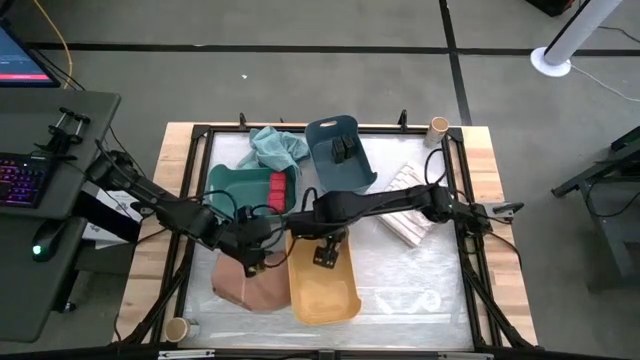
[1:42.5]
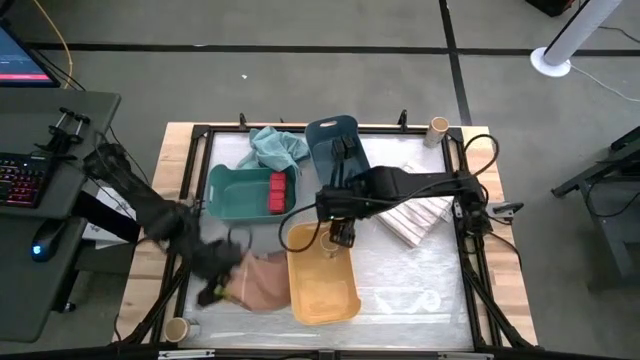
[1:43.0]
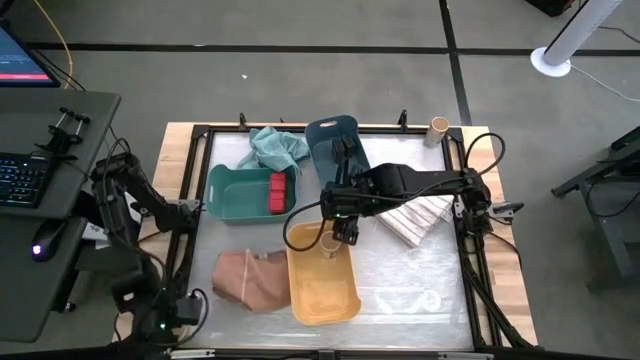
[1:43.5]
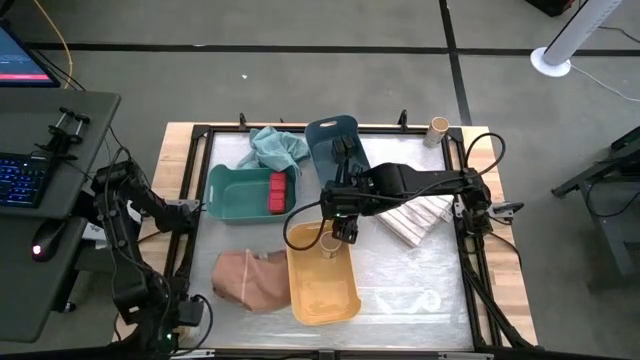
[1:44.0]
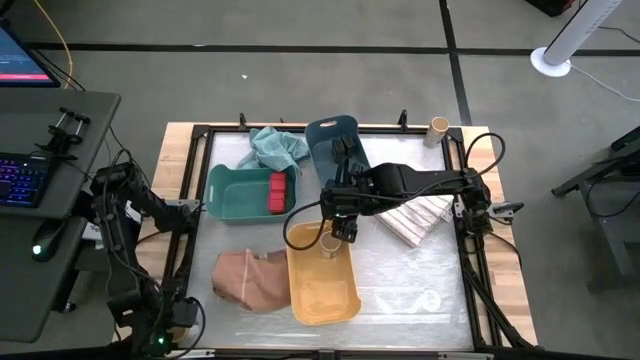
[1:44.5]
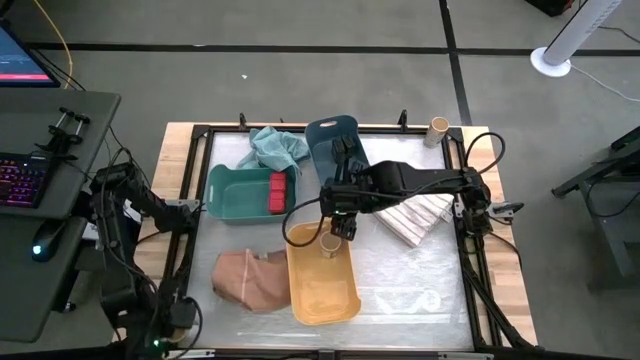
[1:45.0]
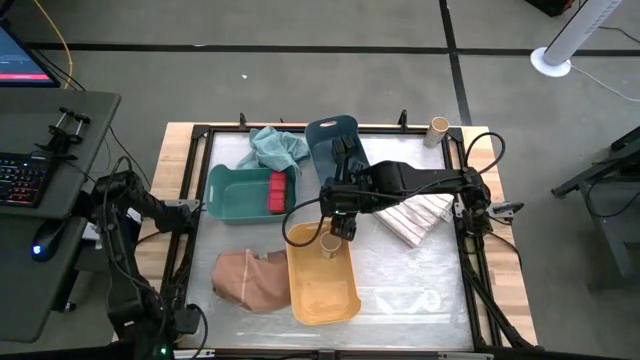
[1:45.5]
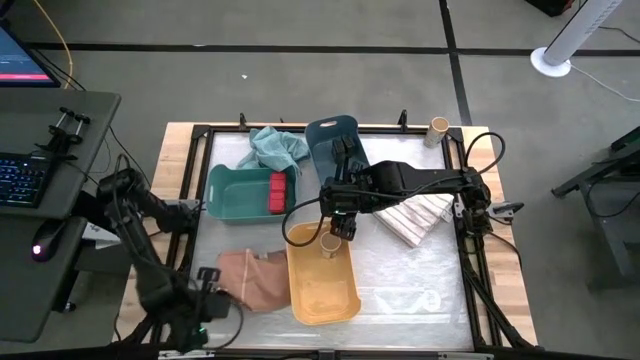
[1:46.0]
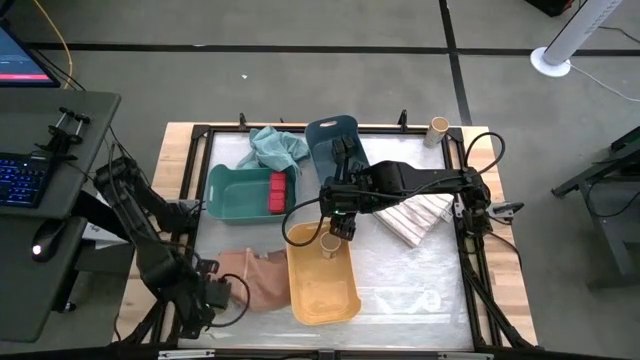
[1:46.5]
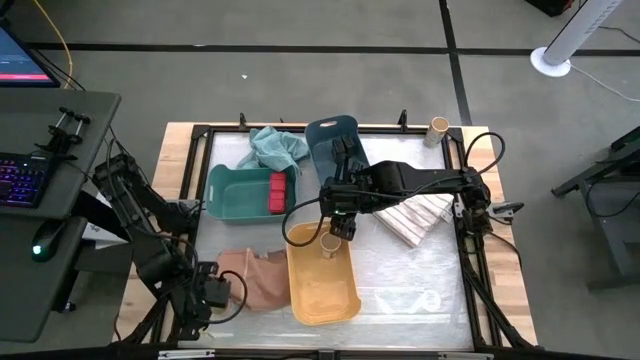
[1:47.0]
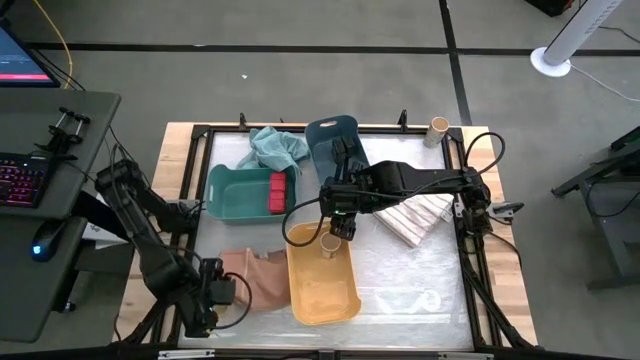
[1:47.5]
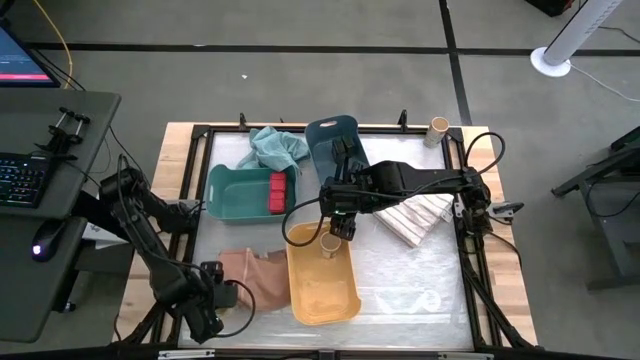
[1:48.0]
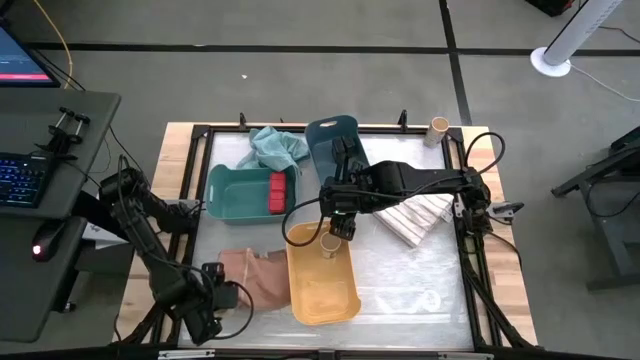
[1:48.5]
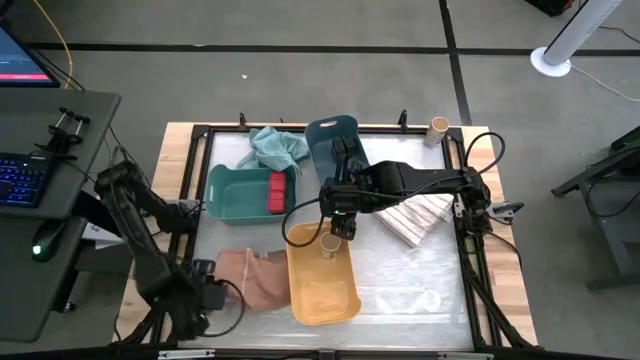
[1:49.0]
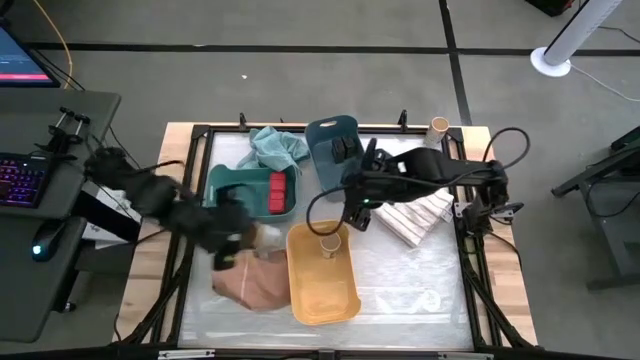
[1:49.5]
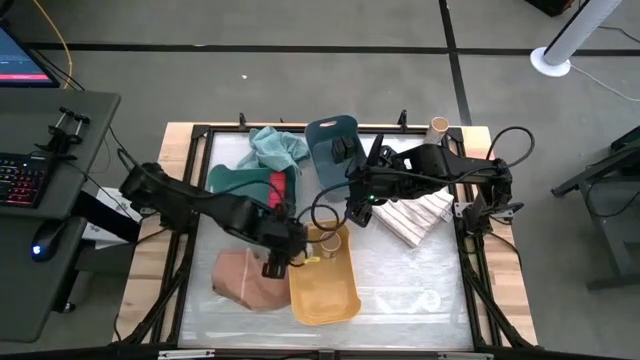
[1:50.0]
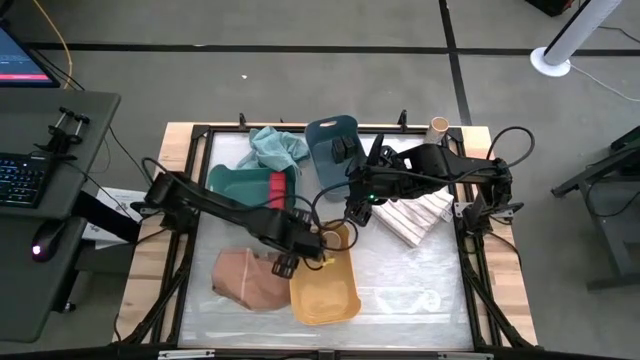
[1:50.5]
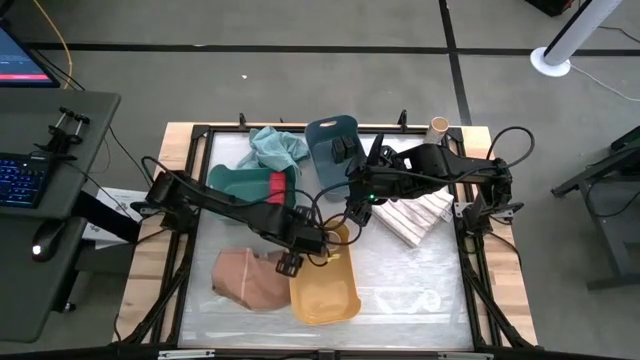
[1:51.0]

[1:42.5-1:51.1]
Task: Sort spices by type
Put the bottom gold seasoning bottle into the orange bin

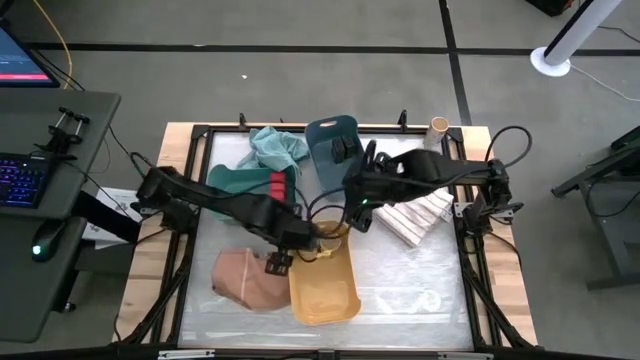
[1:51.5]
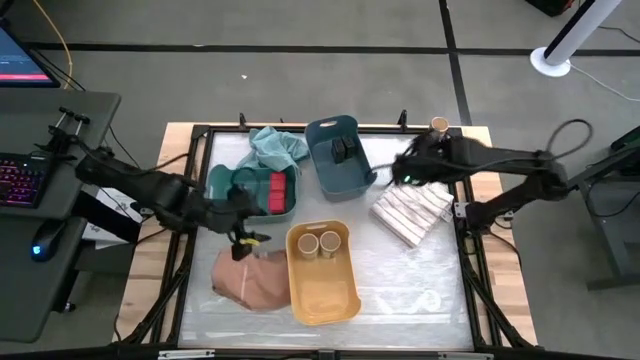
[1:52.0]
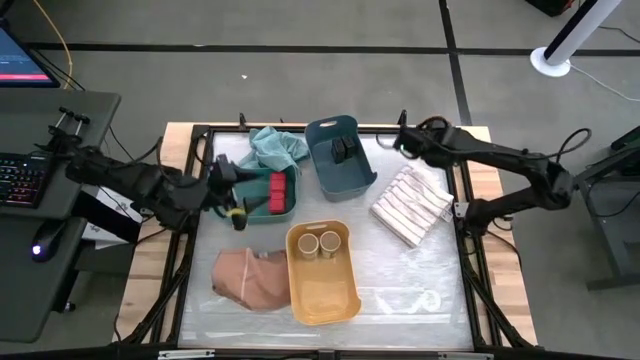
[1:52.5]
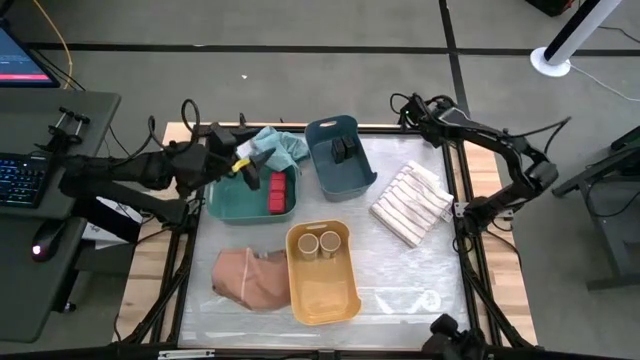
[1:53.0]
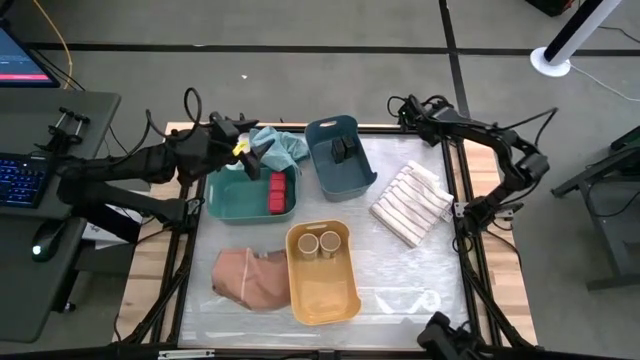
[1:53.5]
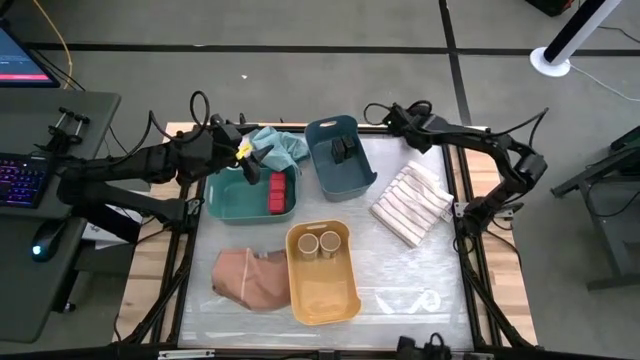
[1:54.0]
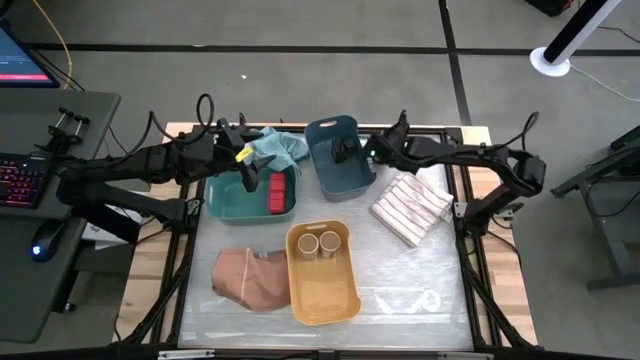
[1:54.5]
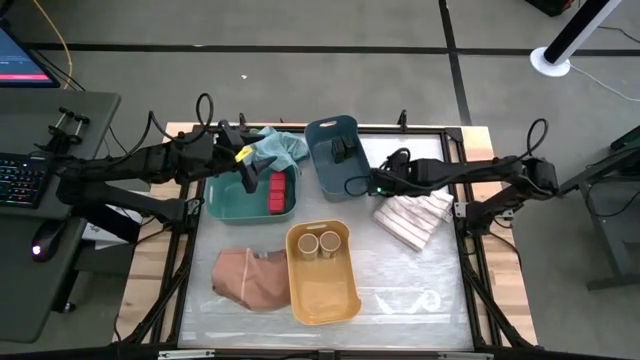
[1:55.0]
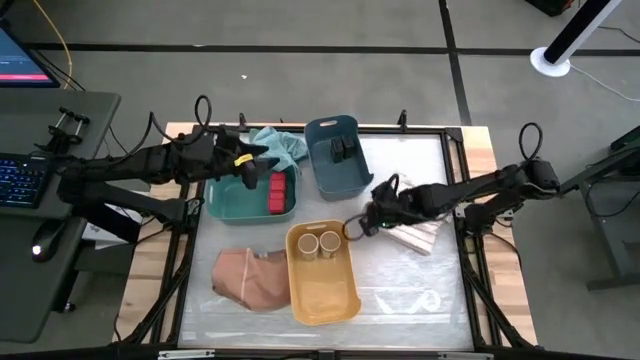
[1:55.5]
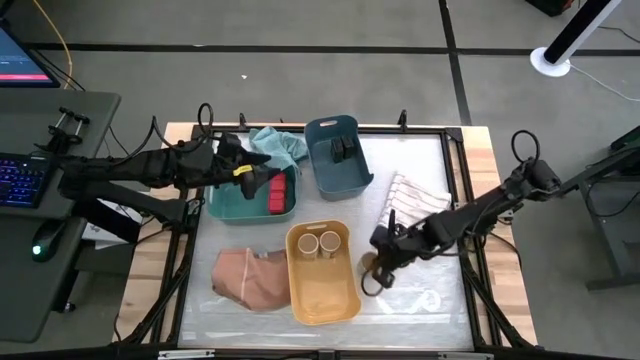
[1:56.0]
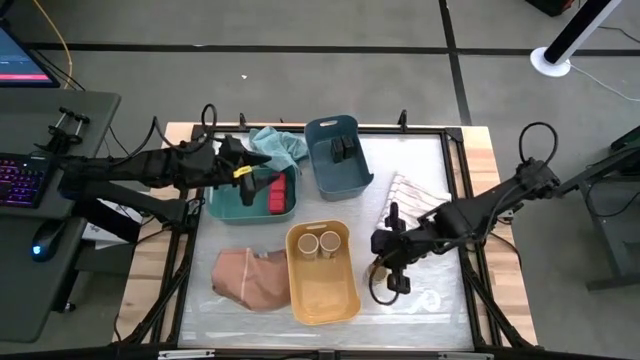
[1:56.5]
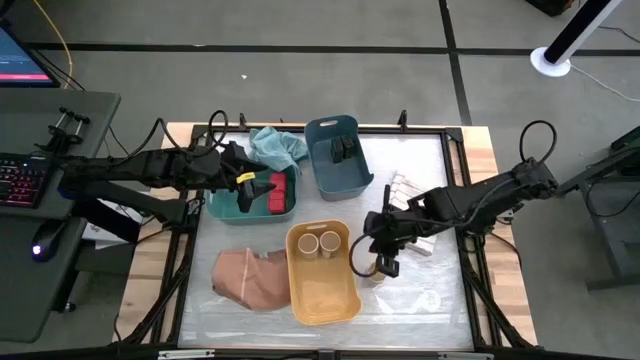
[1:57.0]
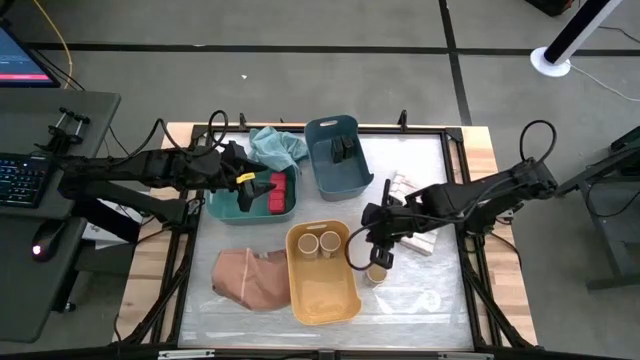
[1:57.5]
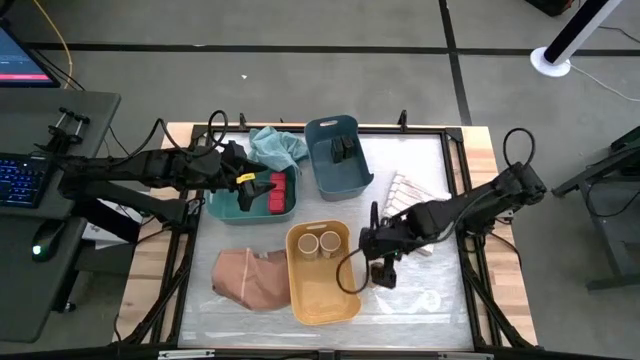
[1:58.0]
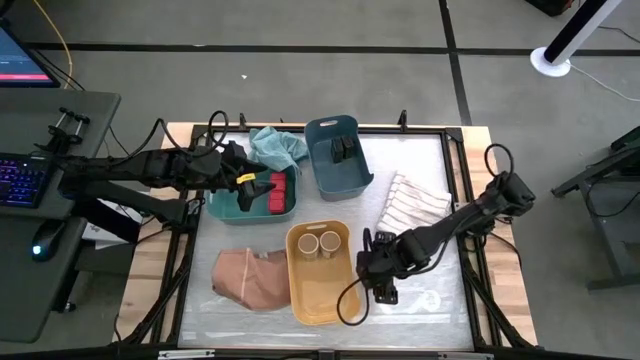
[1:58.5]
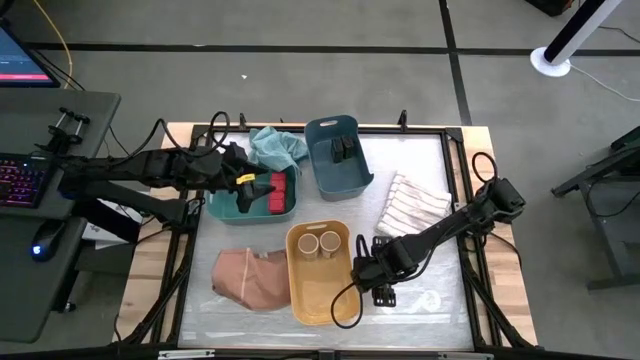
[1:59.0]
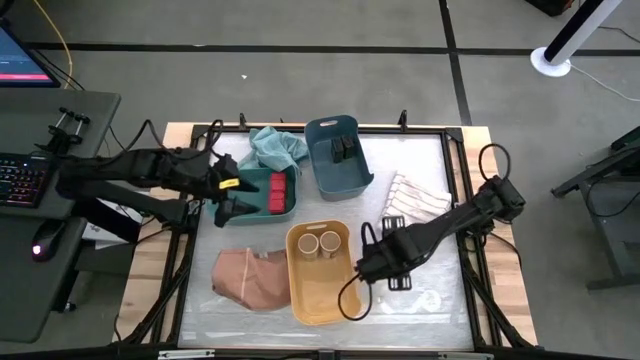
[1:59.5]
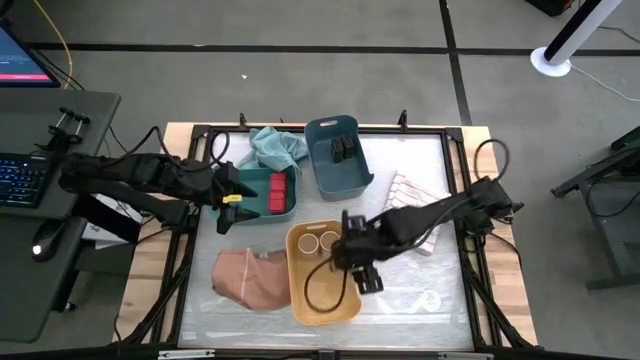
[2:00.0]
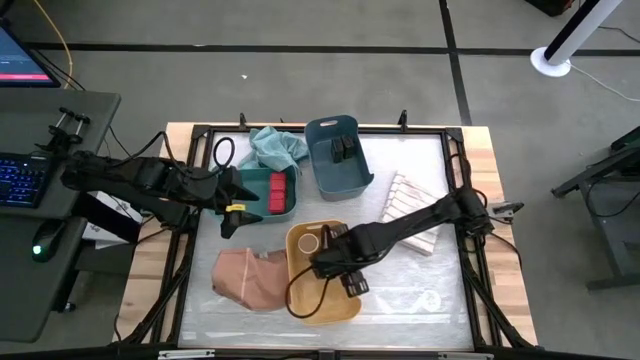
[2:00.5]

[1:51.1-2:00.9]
Put the gold seasoning bottle into the orange bin

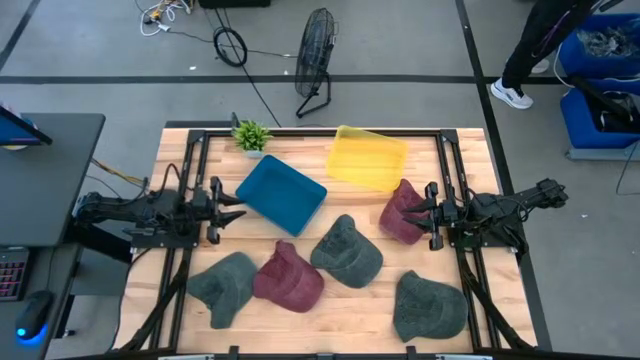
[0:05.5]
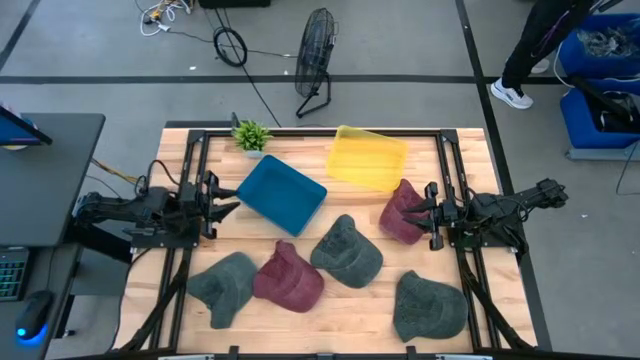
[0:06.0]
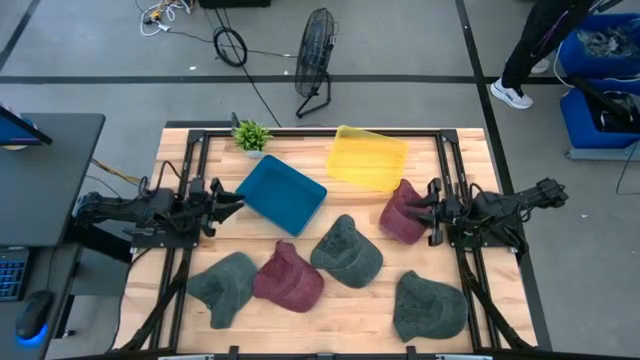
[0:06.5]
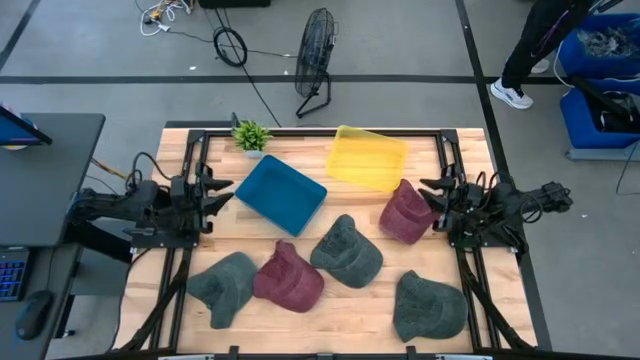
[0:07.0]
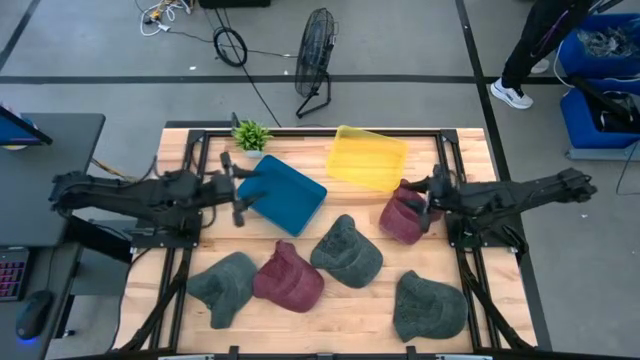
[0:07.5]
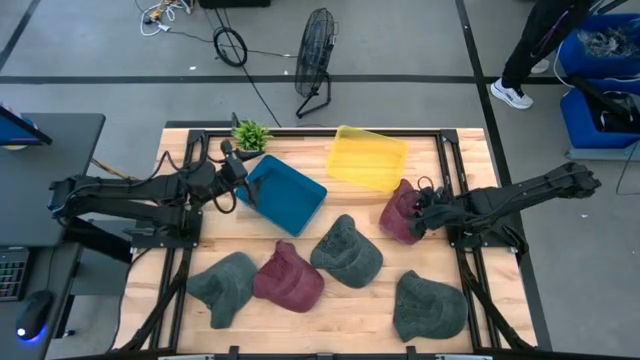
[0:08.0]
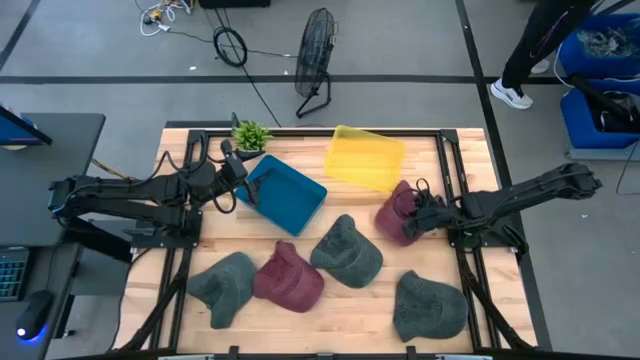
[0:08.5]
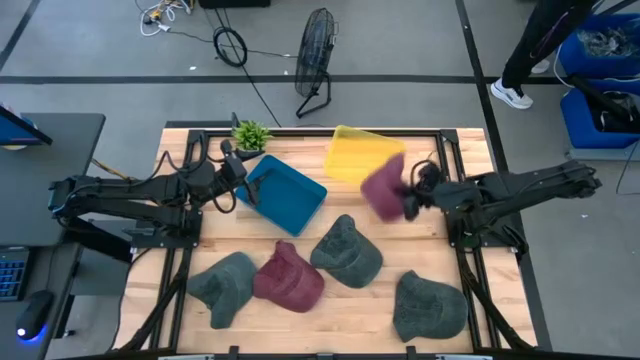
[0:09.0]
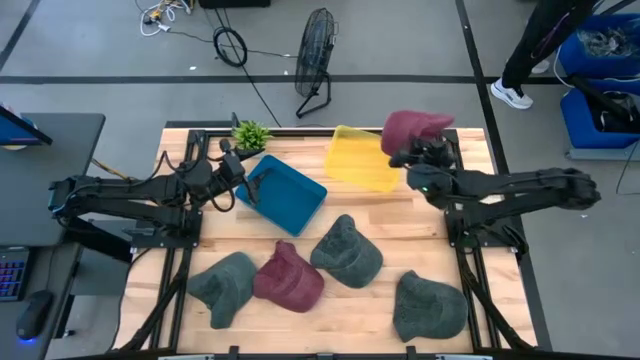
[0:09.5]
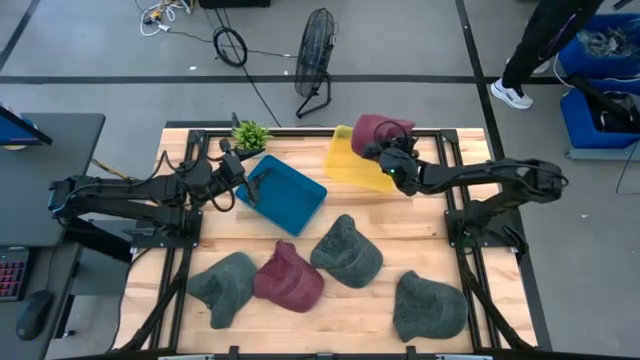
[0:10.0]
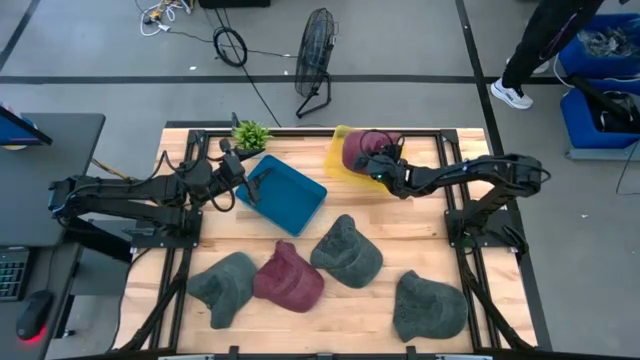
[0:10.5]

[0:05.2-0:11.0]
Task: Pick & Place hat
Put the top red cap into the yellow bin
